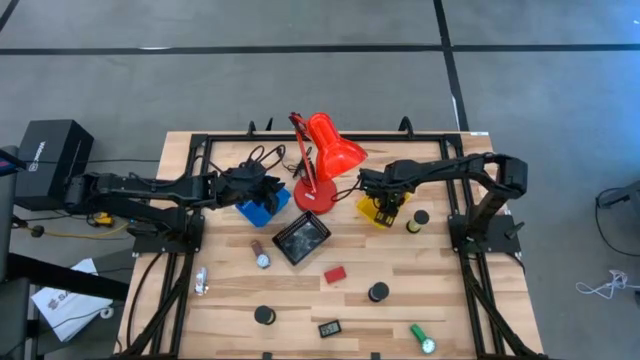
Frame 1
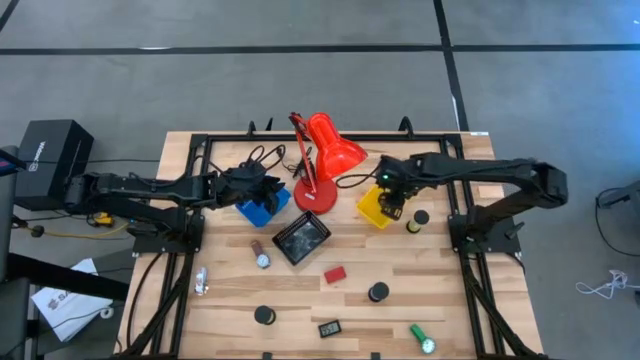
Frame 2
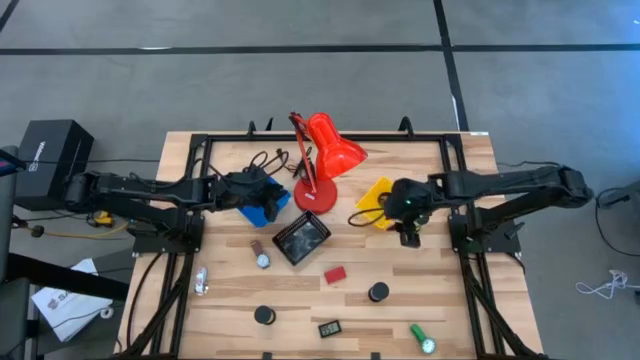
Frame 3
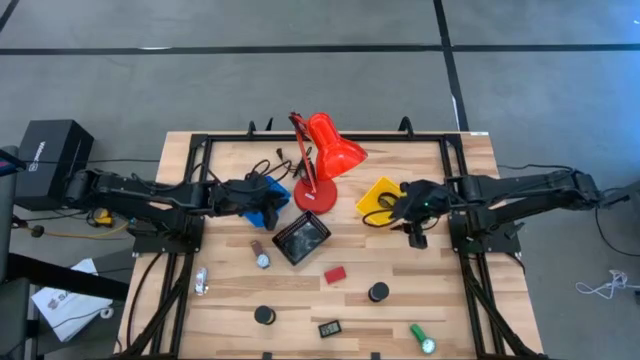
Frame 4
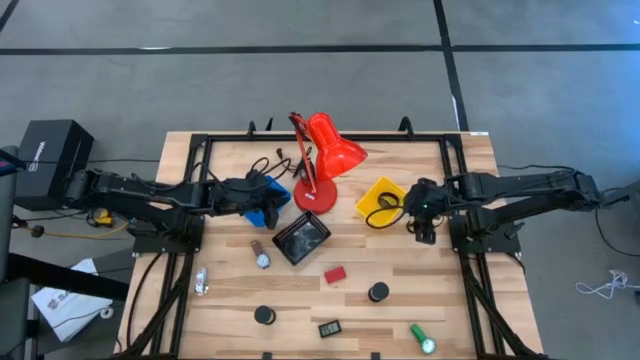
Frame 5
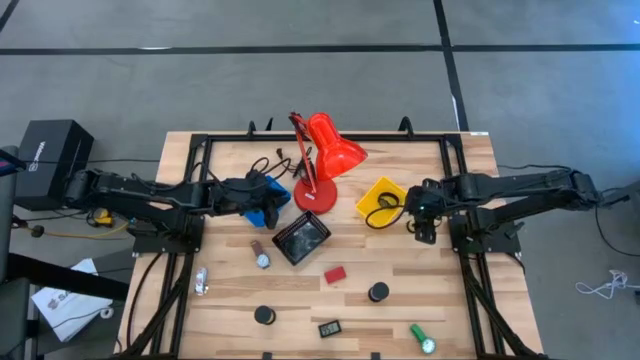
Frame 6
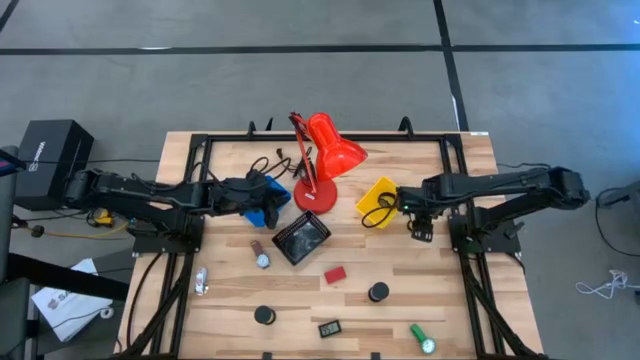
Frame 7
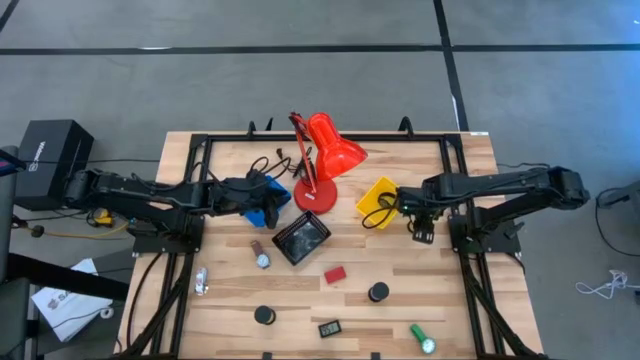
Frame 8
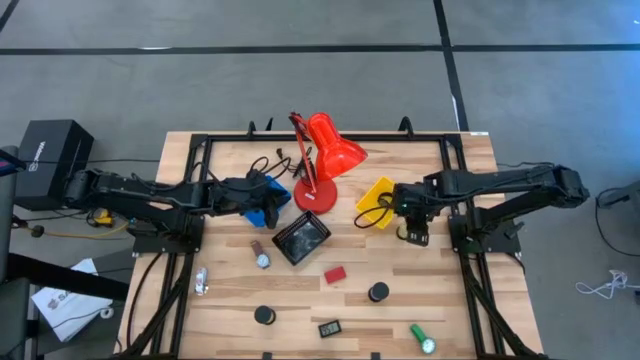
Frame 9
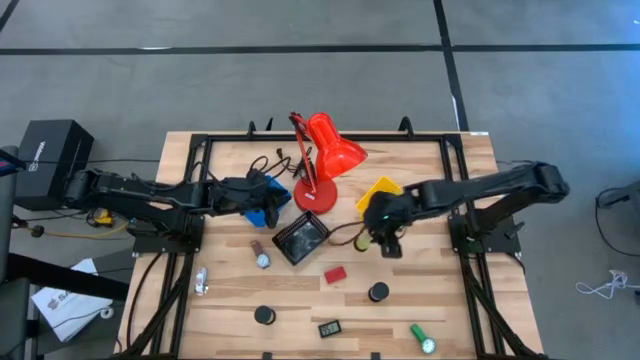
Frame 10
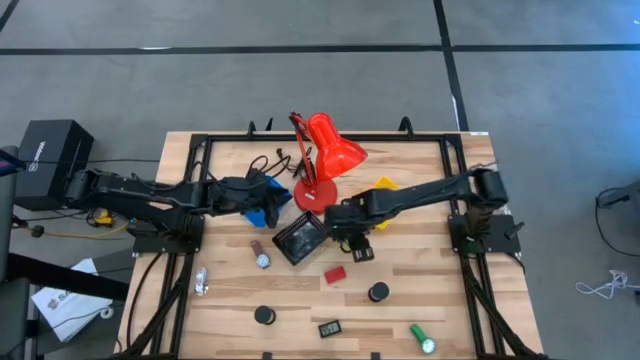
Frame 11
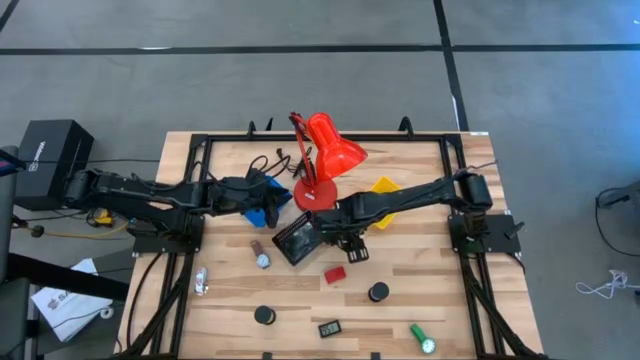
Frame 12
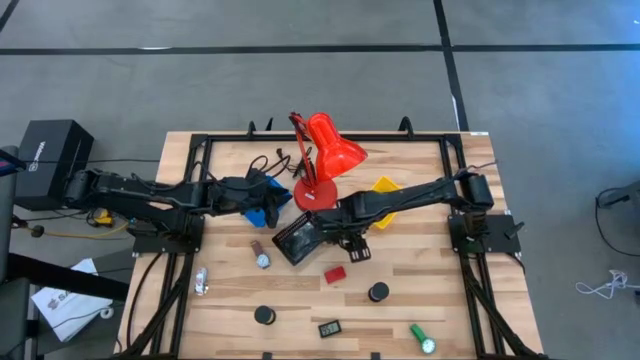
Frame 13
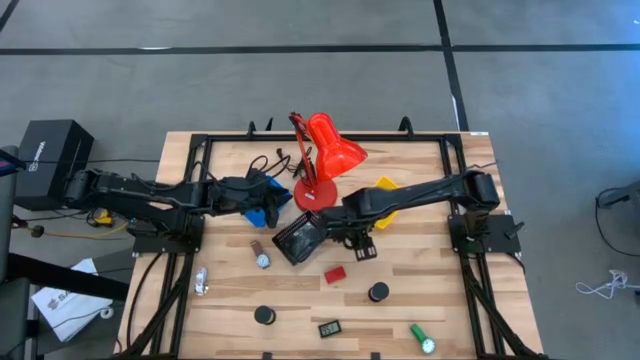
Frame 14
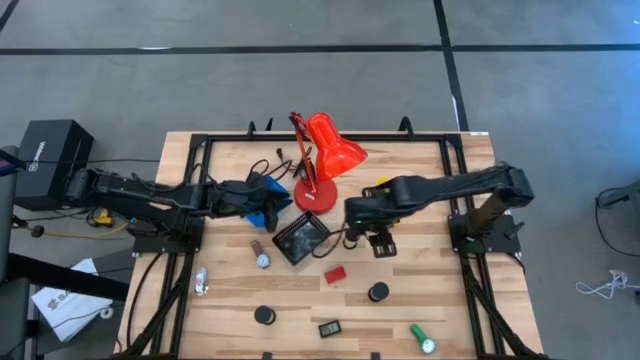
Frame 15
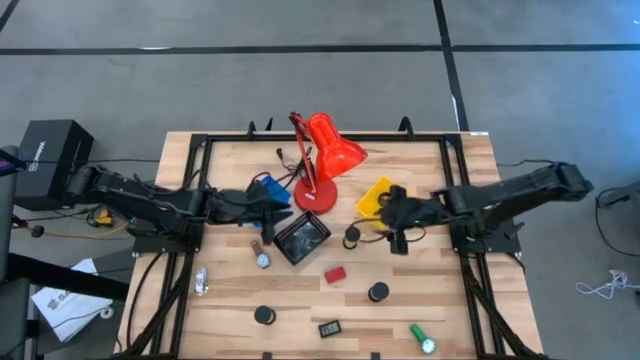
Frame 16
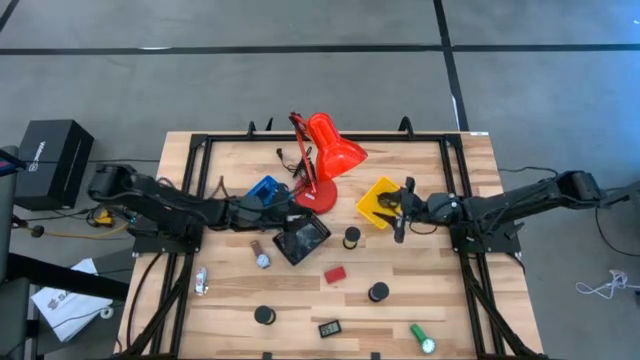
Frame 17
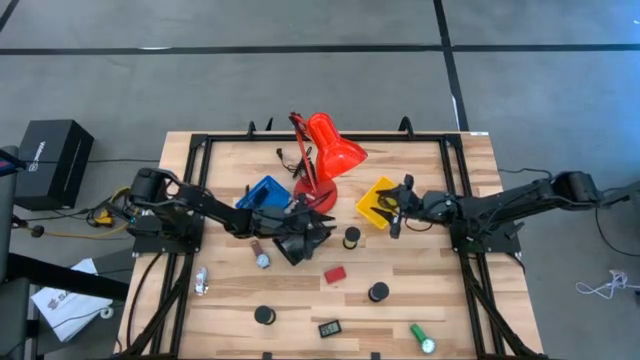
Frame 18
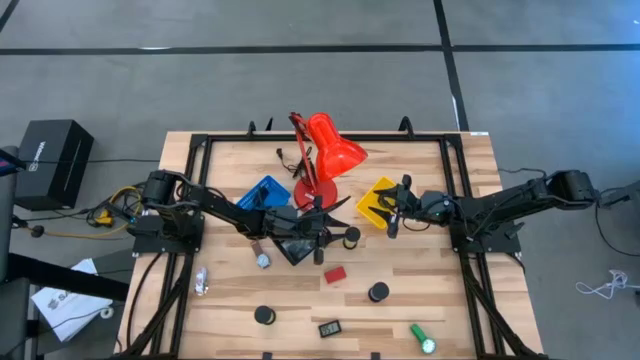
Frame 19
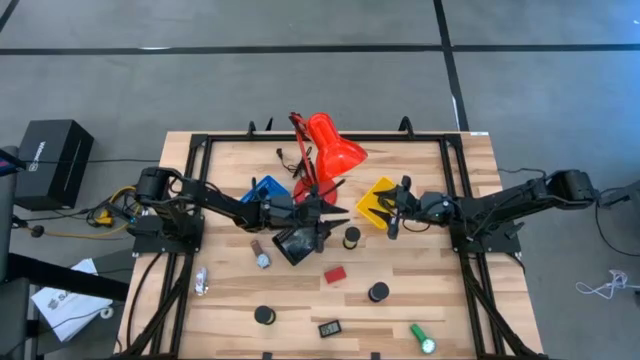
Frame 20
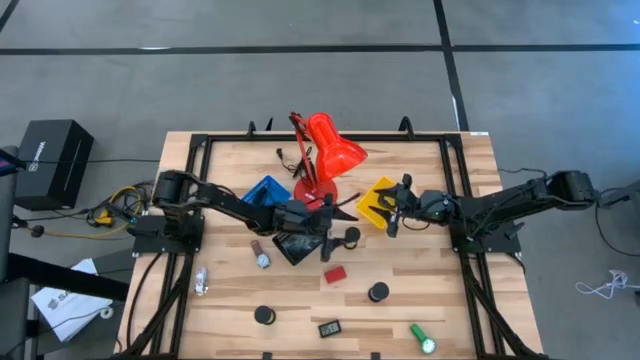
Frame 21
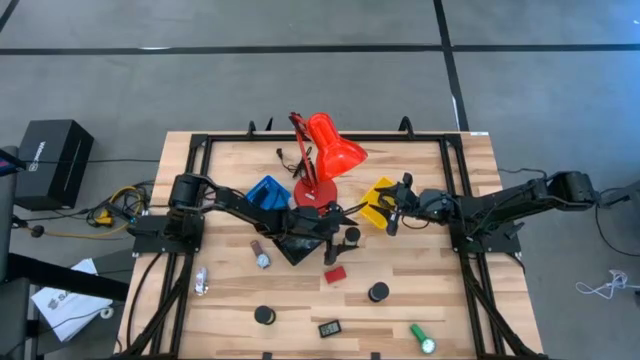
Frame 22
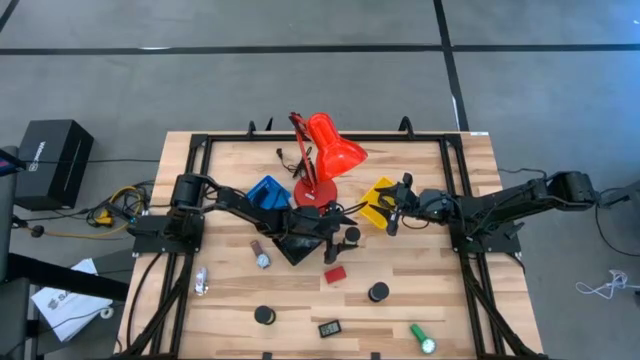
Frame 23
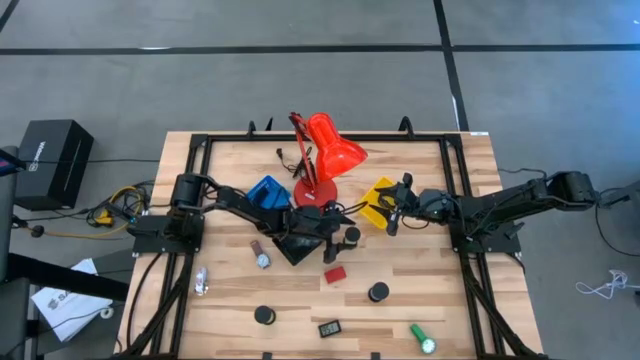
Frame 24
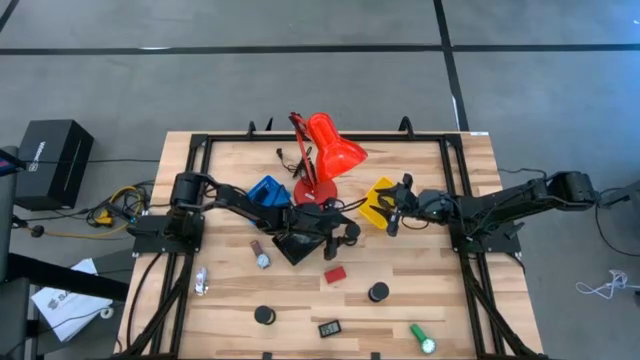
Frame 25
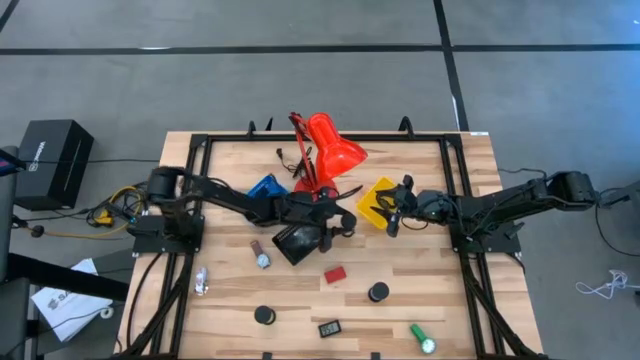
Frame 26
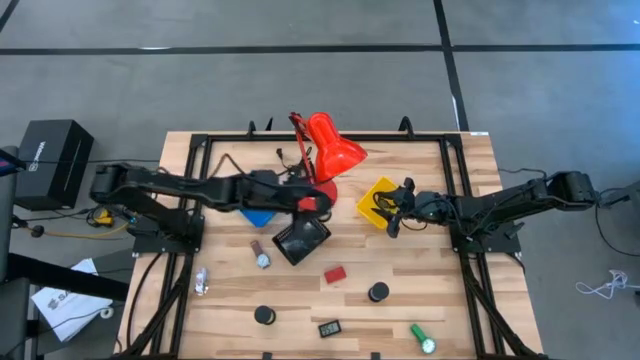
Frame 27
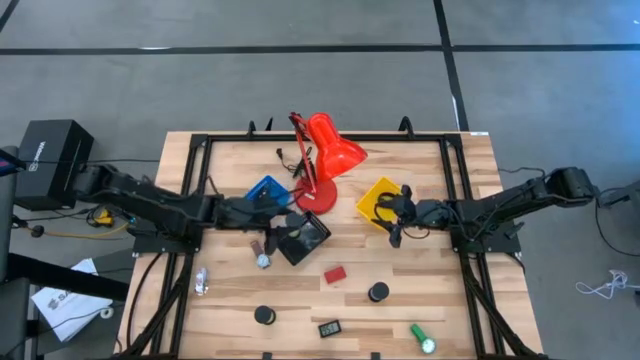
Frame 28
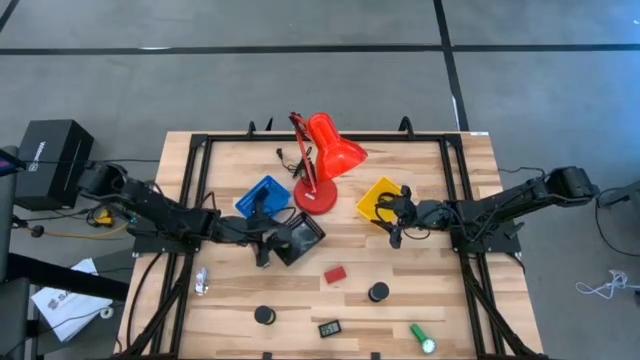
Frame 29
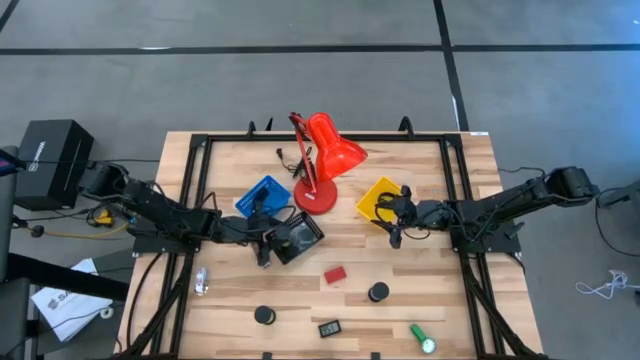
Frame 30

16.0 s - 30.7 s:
Task: Pick & Place Office items
Put the right green hourglass into the black bin

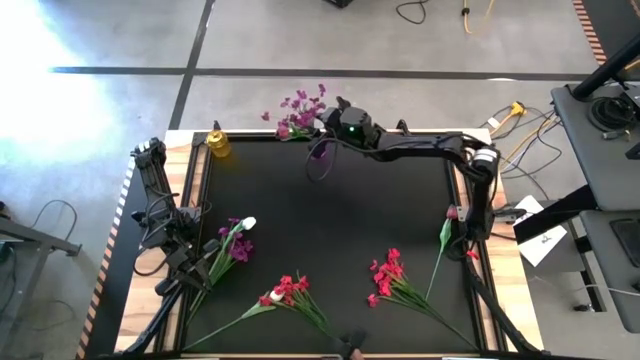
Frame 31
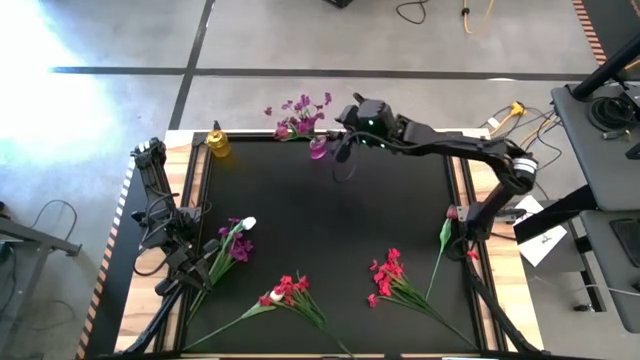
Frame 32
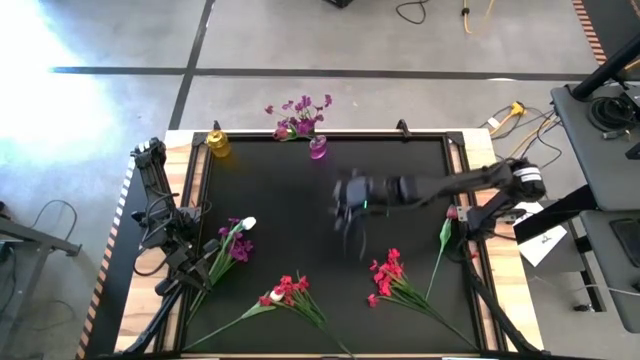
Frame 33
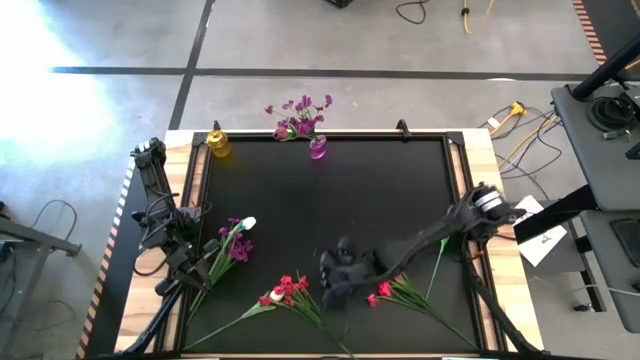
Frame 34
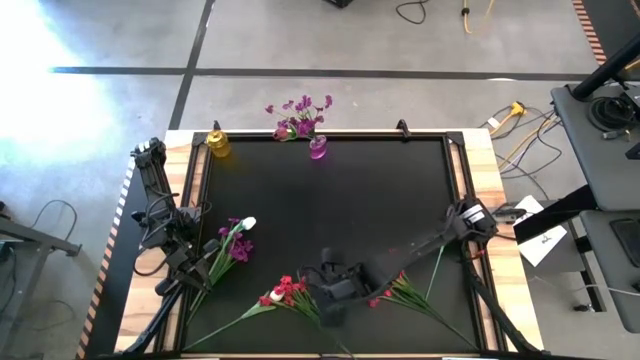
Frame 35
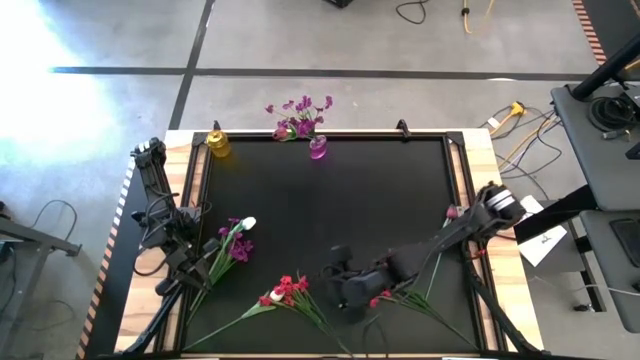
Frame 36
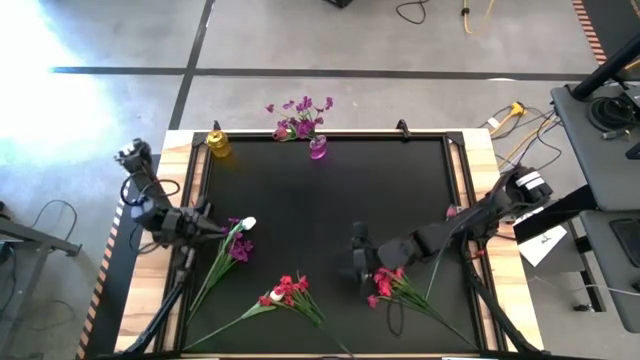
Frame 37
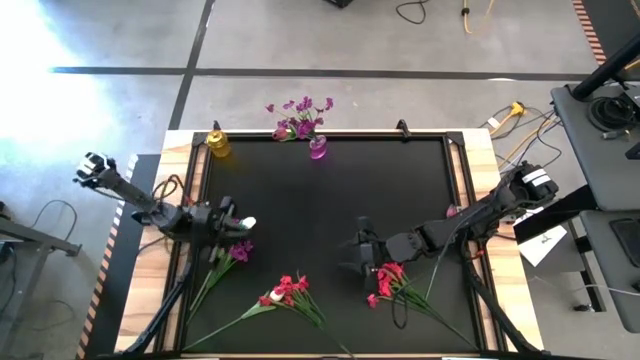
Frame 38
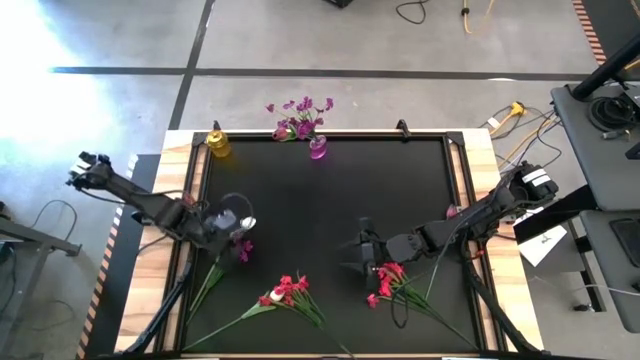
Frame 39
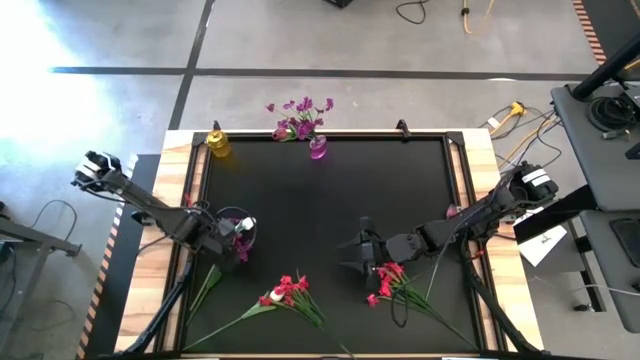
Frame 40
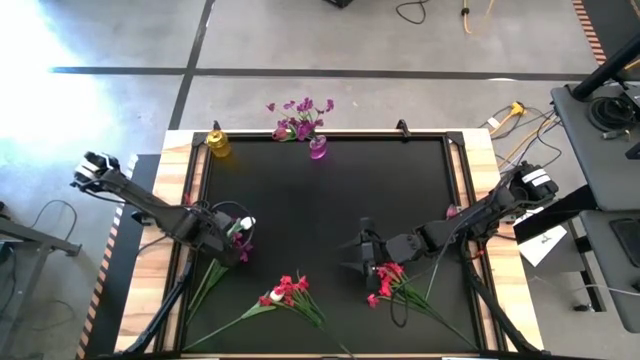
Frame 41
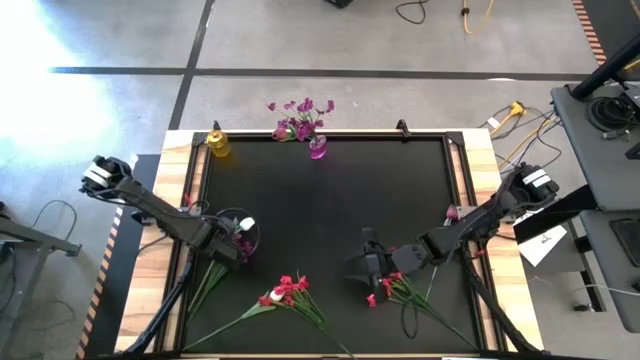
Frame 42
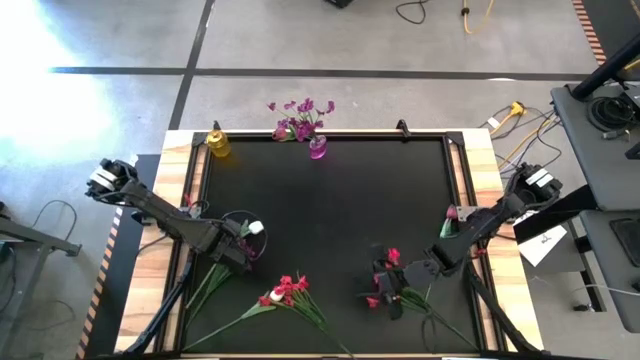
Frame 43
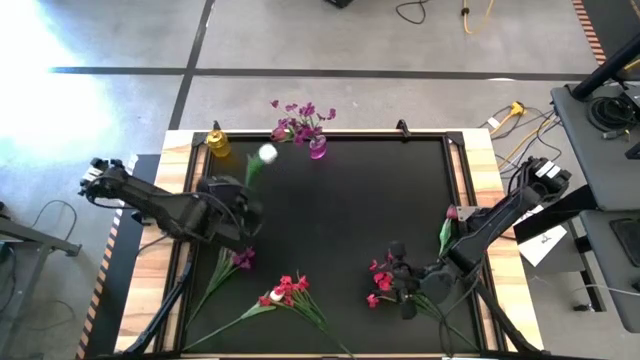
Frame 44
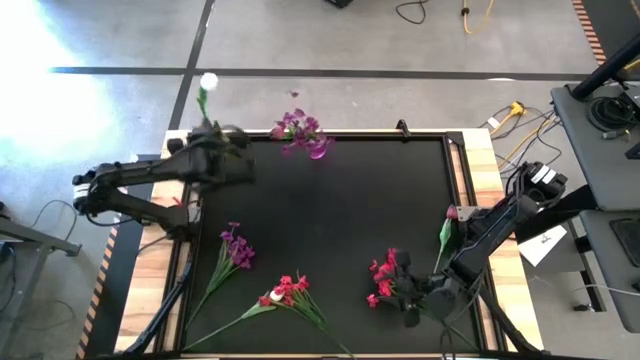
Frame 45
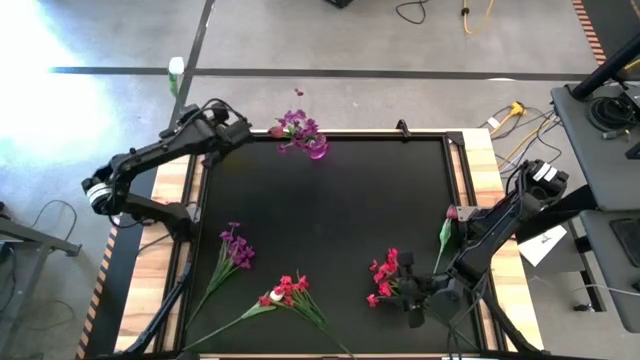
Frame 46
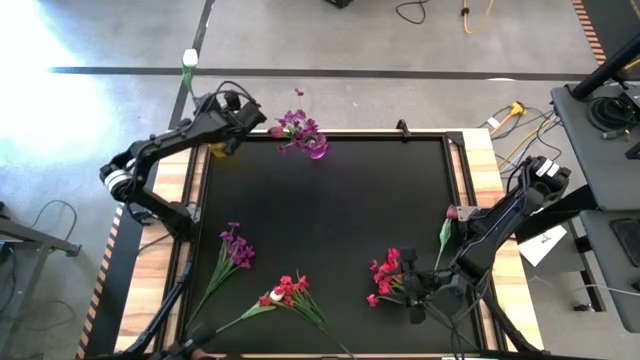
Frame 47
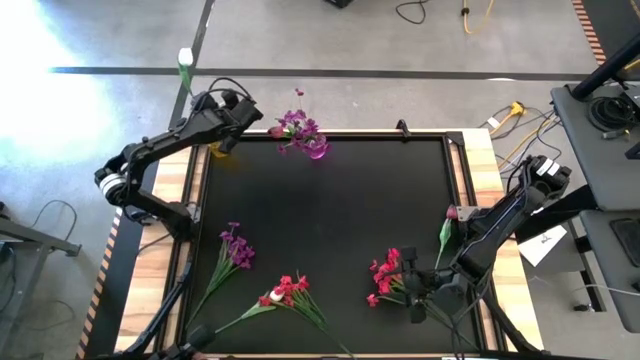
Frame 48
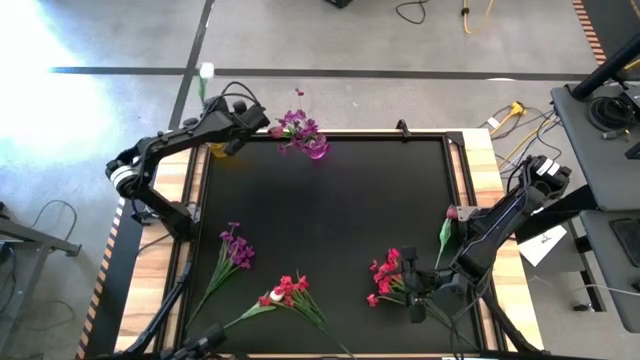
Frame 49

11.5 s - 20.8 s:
Task: Sort flowers into vase by color
Put the top white tulip into the yellow vase
